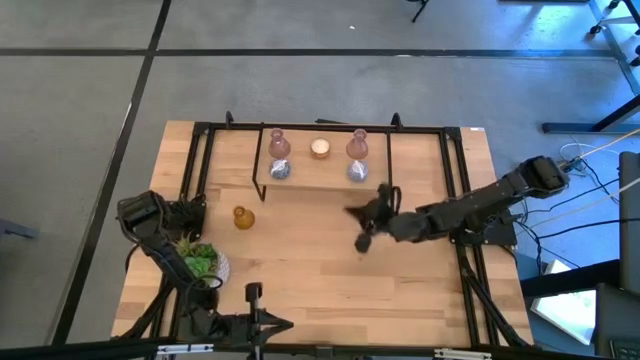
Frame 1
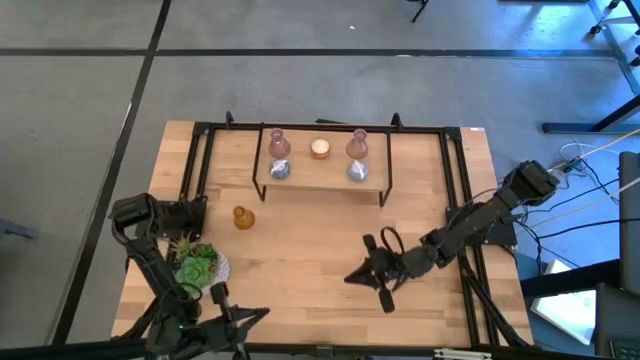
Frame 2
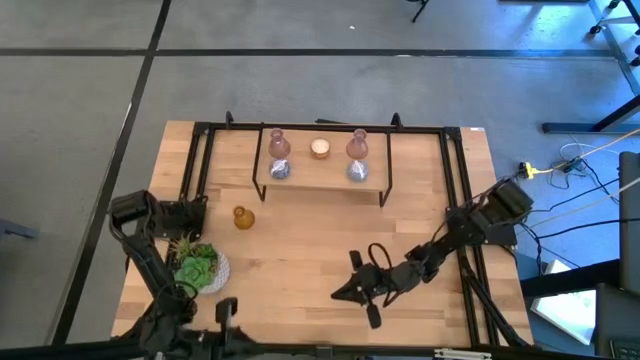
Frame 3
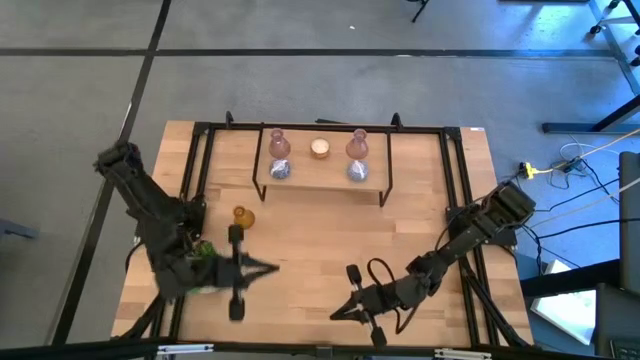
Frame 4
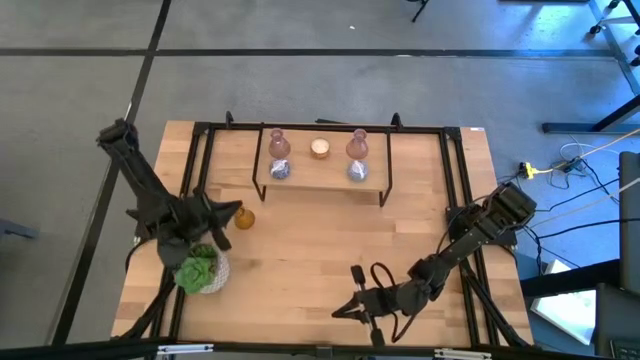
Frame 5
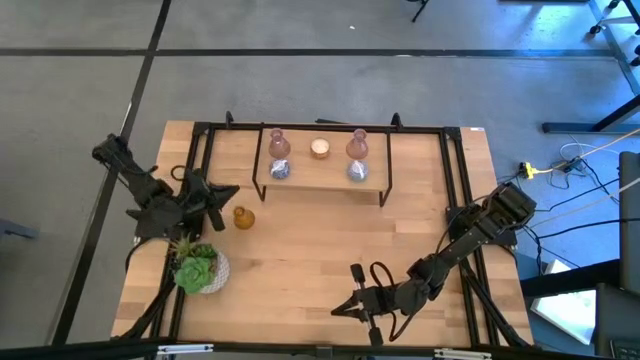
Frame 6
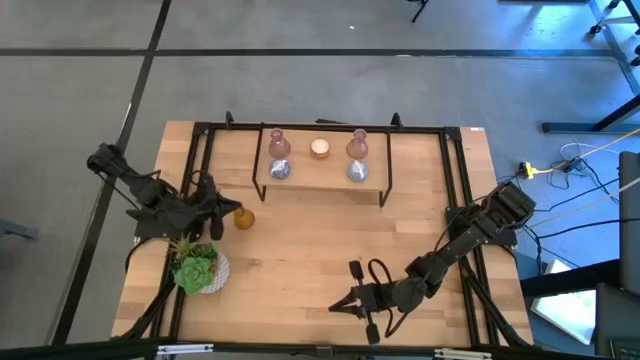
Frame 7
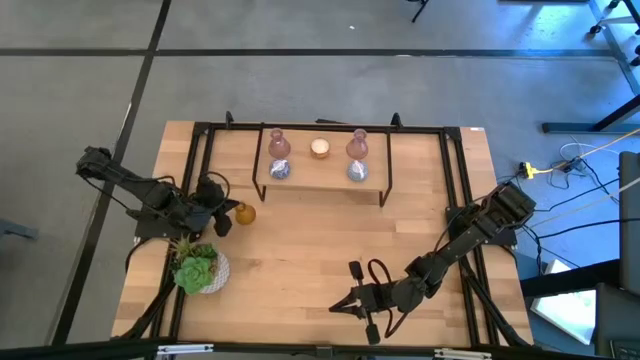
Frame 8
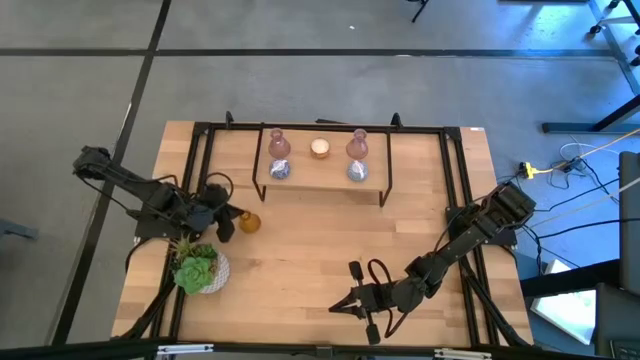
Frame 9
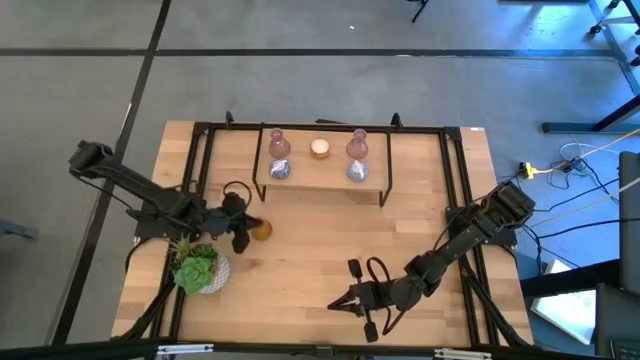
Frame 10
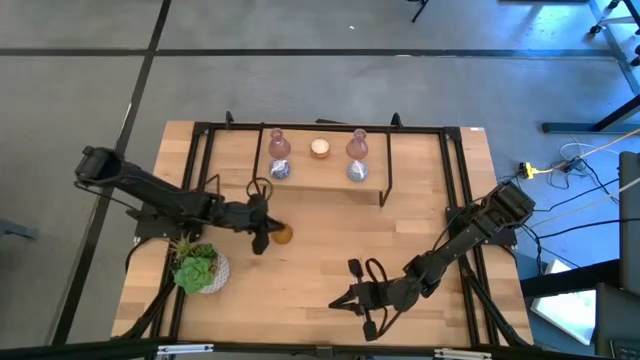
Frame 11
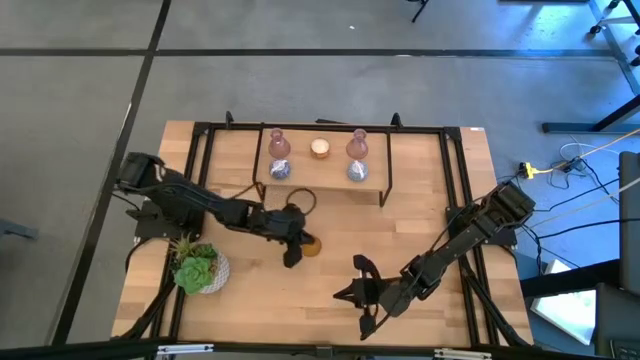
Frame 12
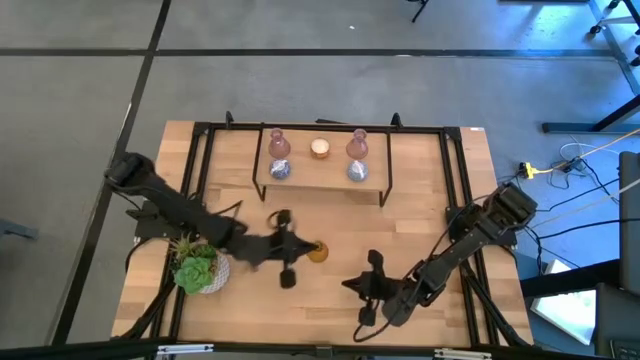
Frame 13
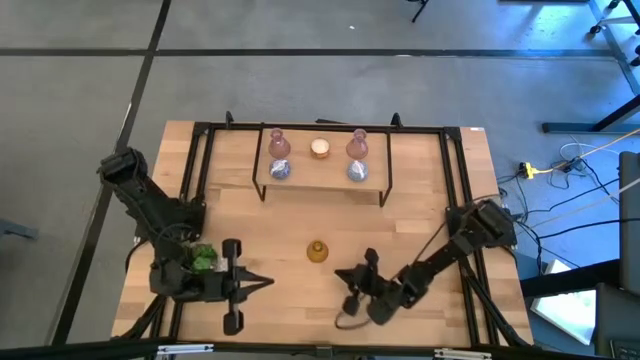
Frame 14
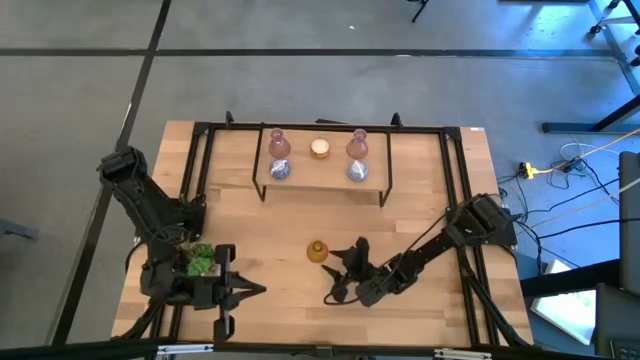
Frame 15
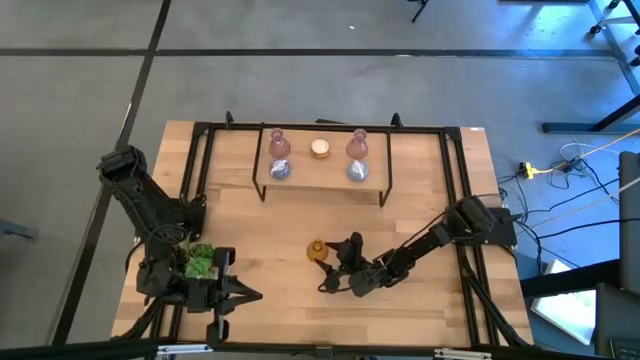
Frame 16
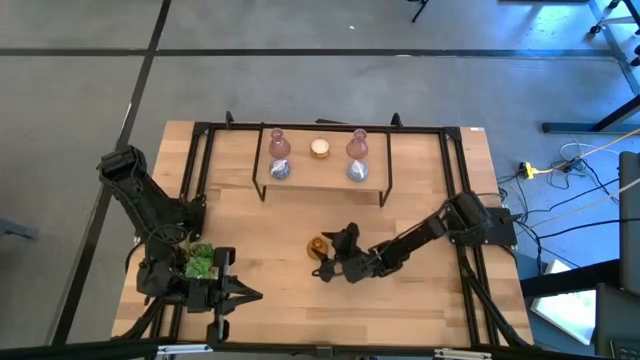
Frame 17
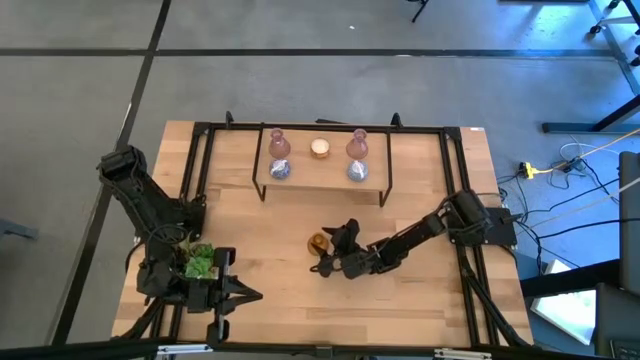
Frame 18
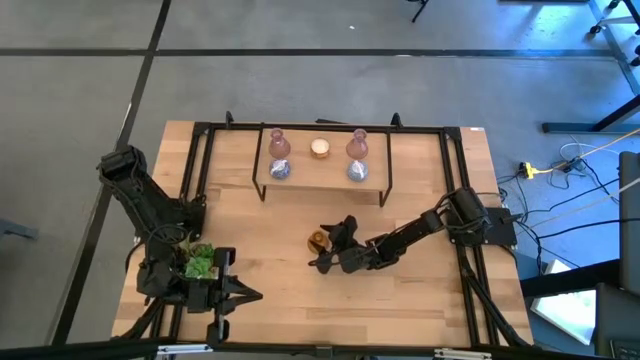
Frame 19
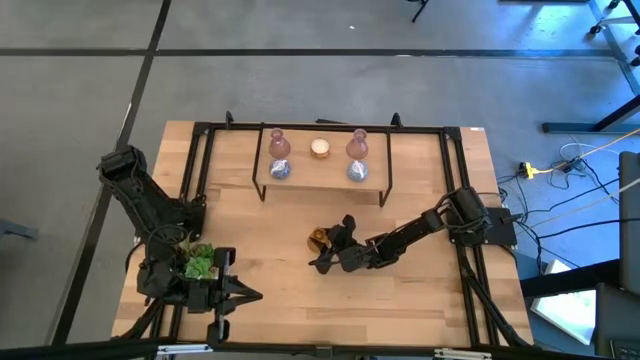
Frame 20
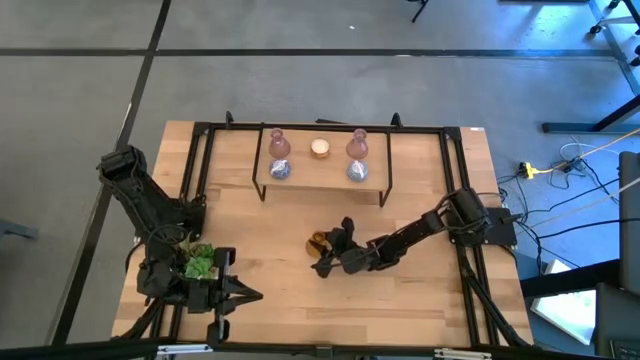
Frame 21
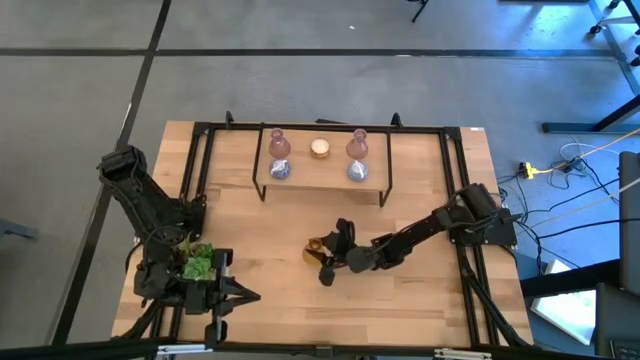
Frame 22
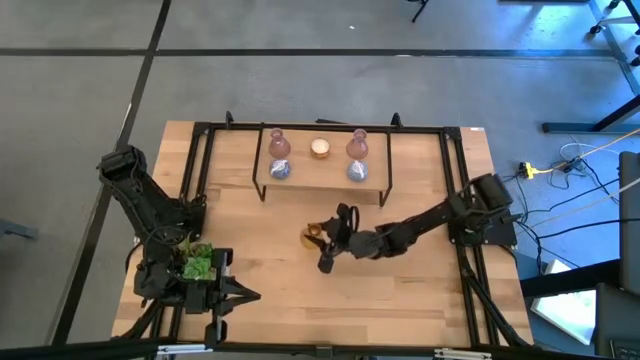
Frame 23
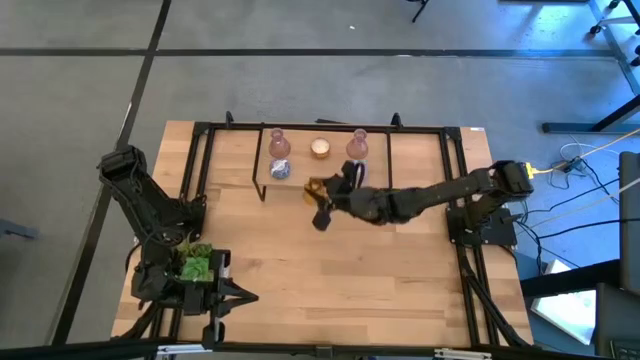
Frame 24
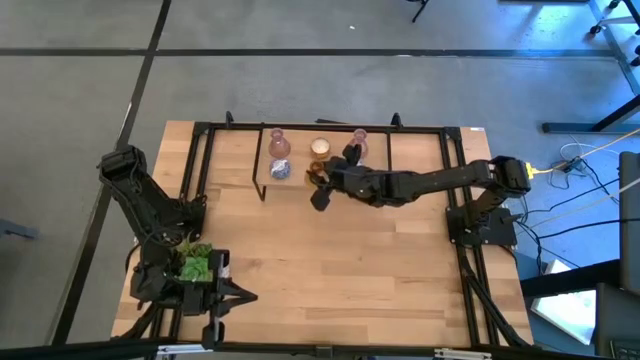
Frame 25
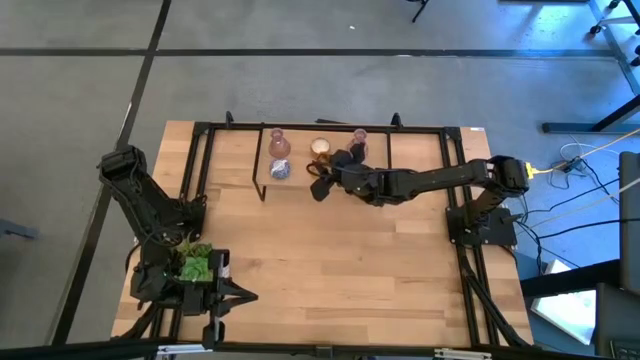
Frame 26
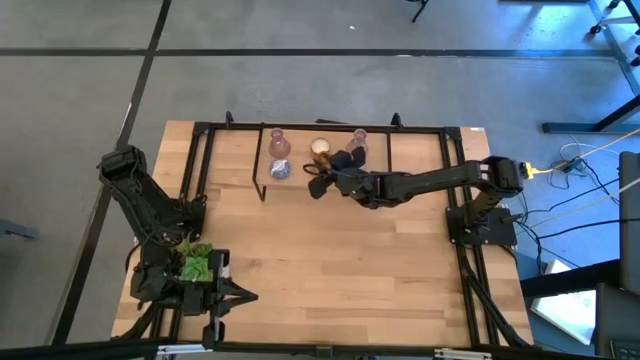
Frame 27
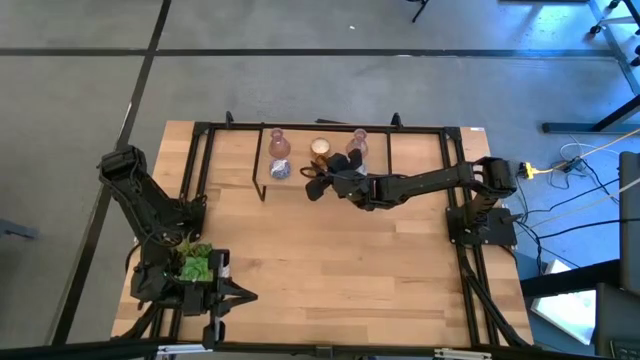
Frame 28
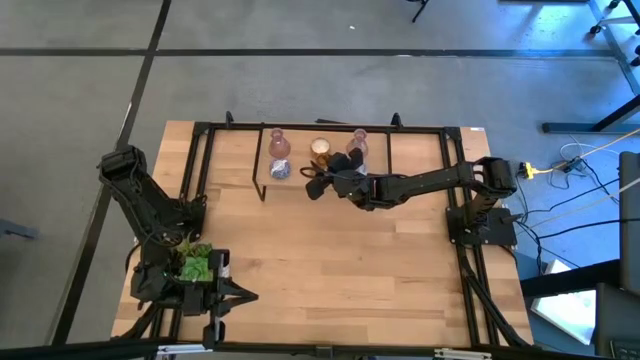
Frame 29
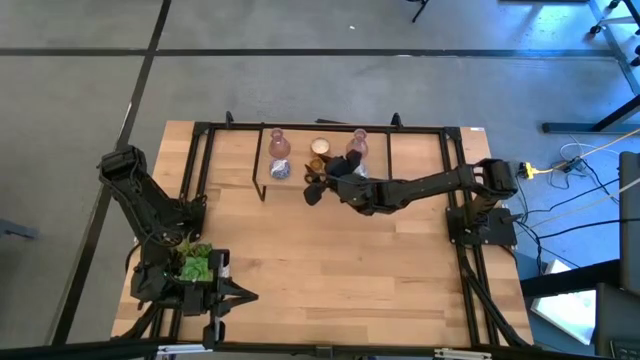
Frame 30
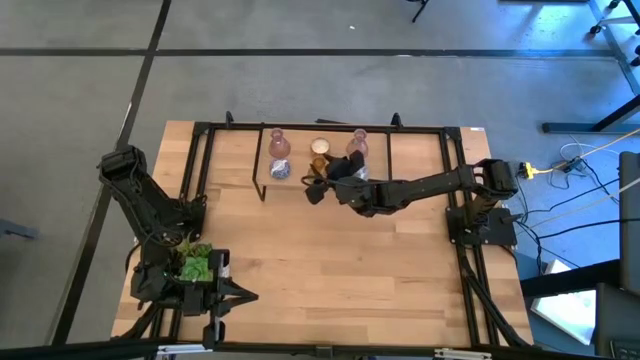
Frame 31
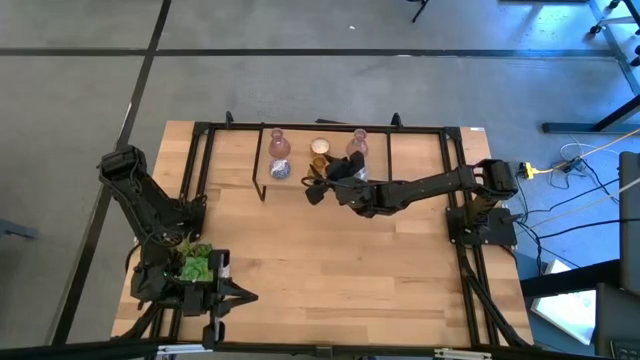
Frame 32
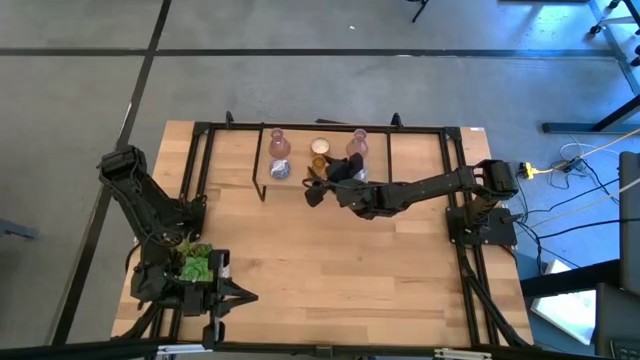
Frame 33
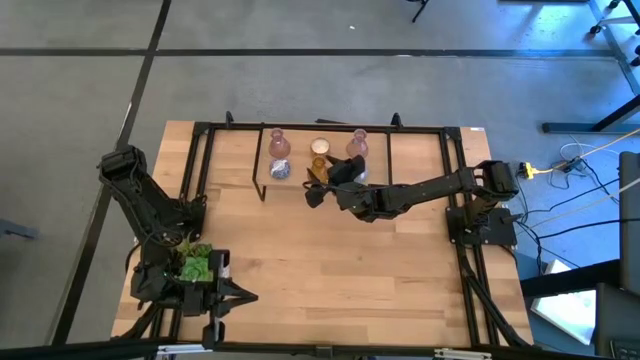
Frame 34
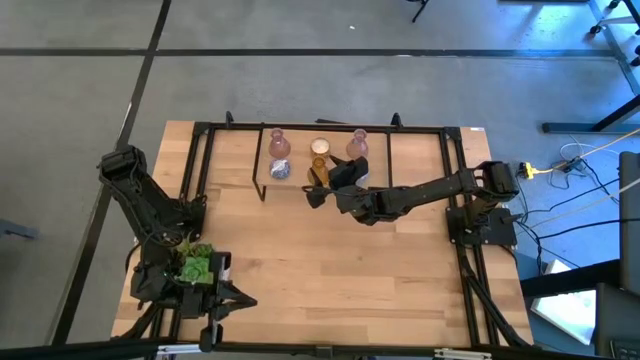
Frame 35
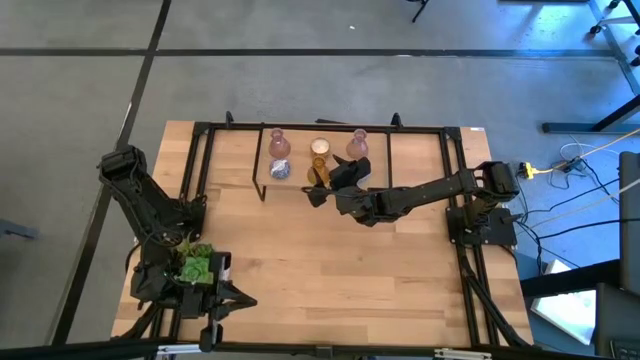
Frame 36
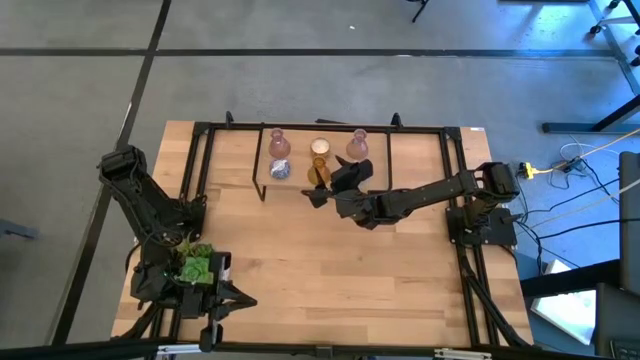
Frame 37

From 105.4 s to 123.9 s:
Task: Pick & Place candle stick holders
Put the orange glass candle holder on the shelf

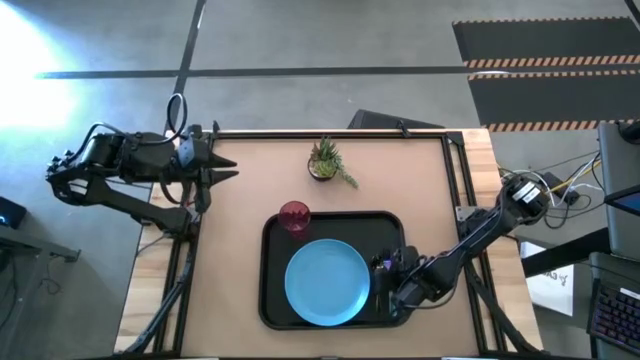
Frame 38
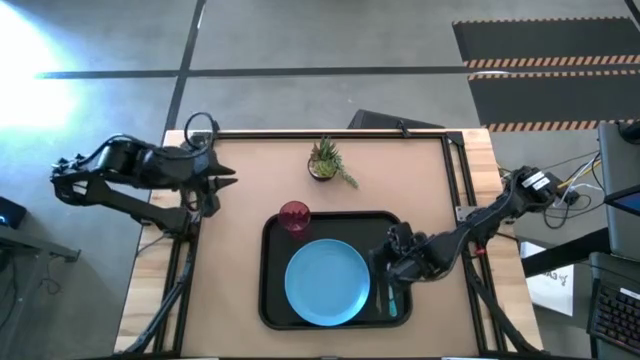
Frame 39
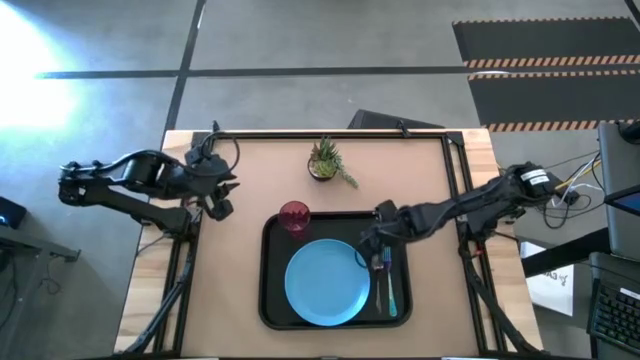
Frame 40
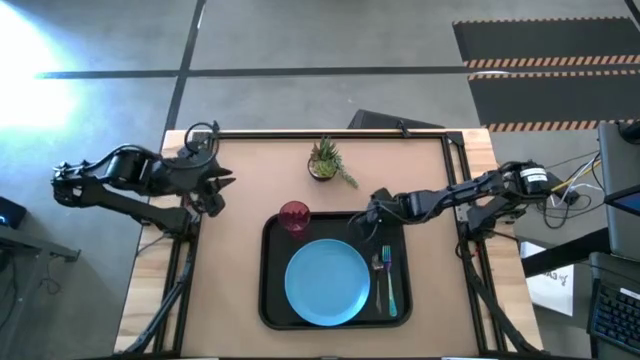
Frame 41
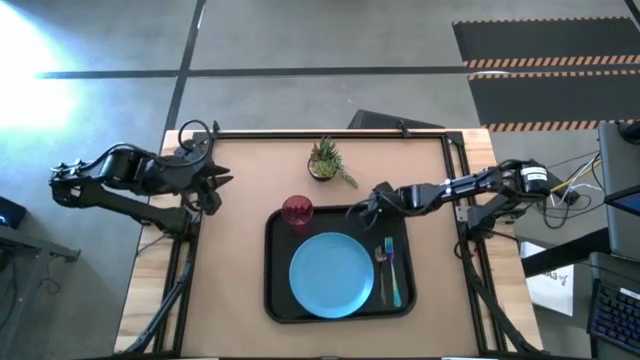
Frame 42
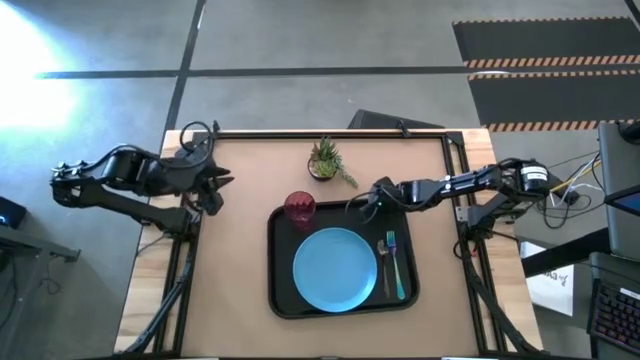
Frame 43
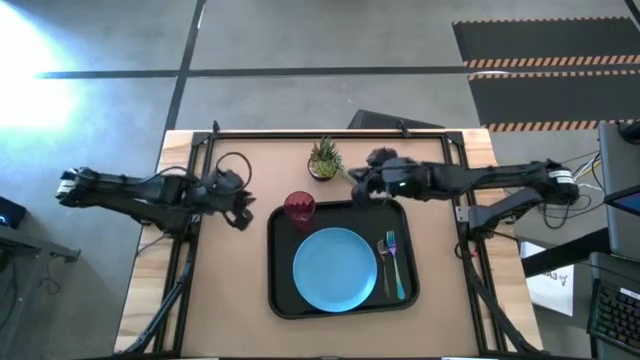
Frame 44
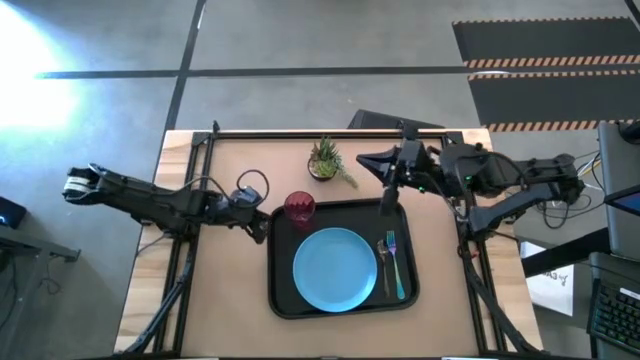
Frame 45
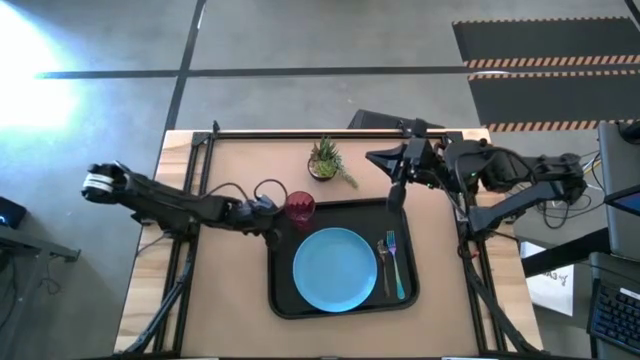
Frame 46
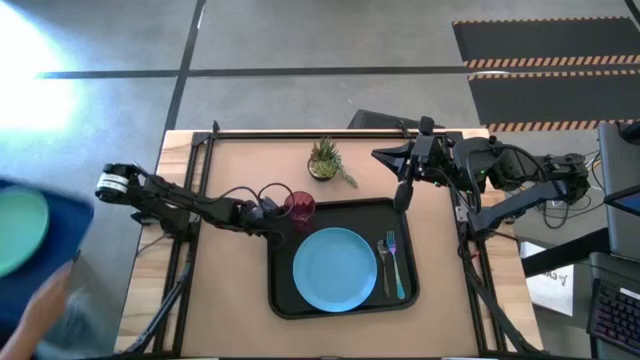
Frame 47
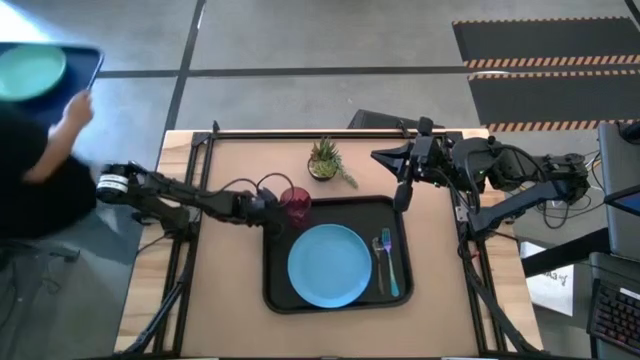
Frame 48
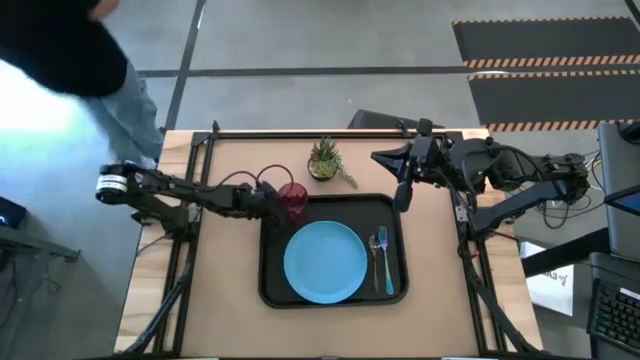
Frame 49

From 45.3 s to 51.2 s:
Task: Pick and place plate/cup/fork/spoon on tray
Adjust the black serving tray
